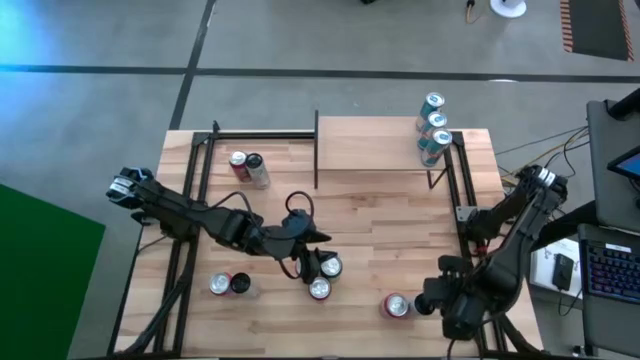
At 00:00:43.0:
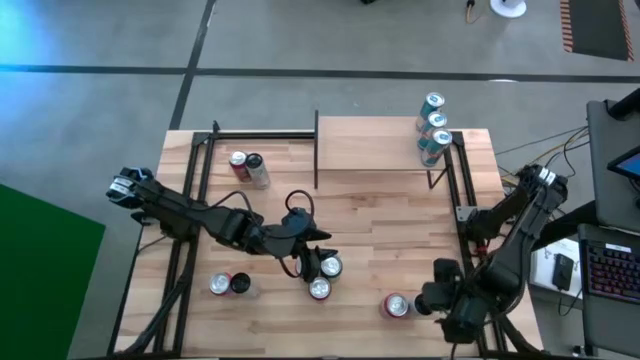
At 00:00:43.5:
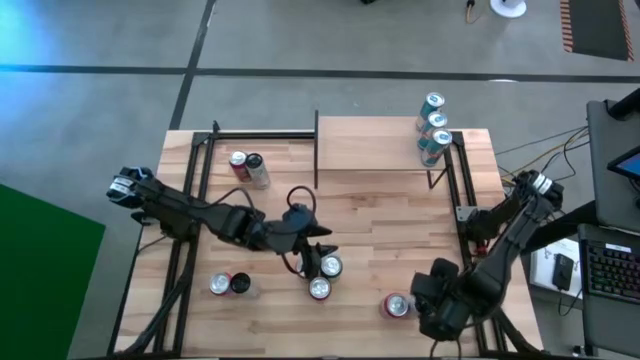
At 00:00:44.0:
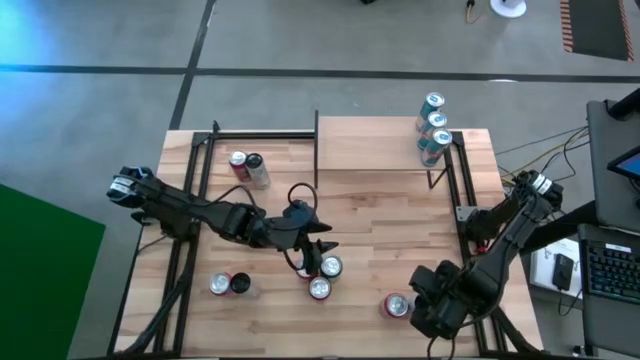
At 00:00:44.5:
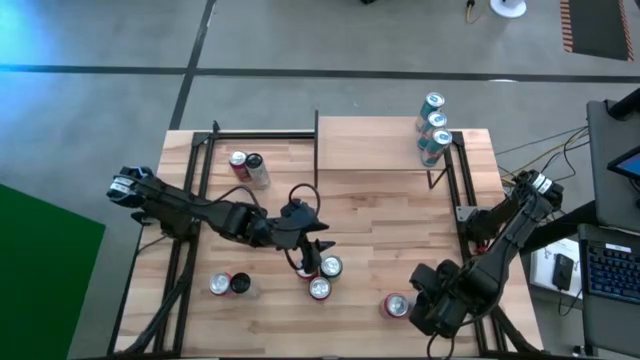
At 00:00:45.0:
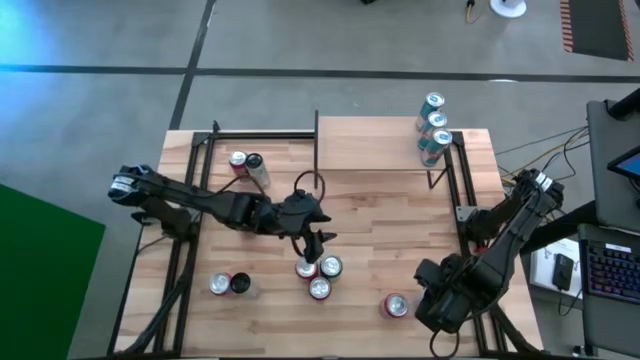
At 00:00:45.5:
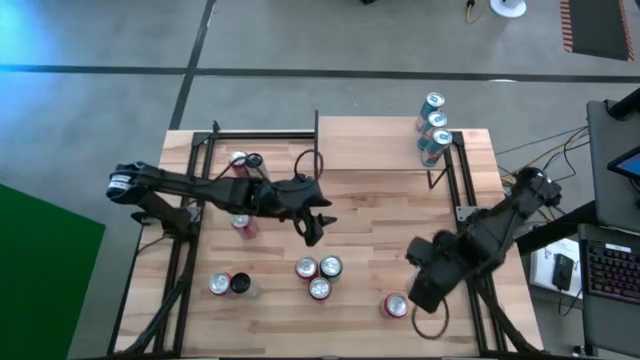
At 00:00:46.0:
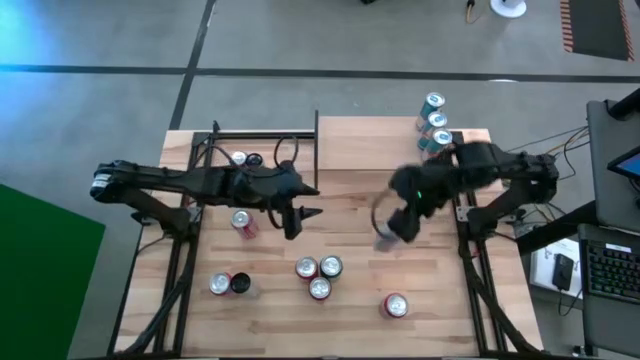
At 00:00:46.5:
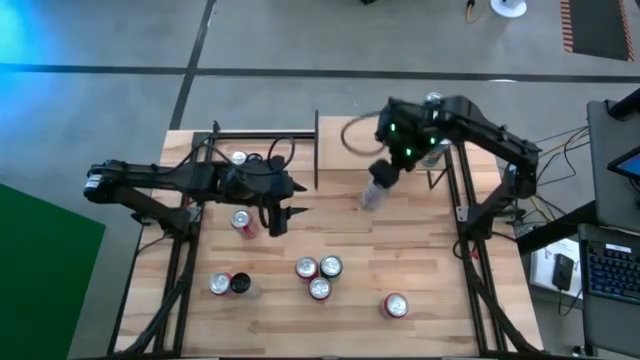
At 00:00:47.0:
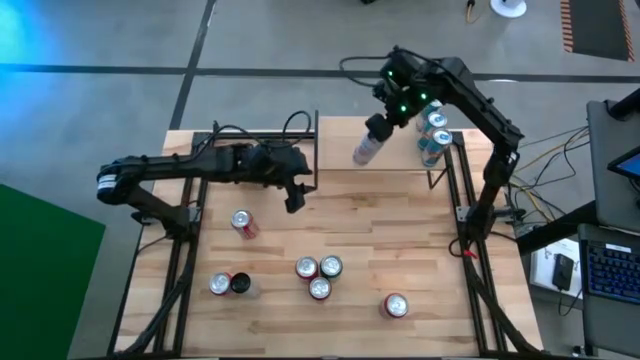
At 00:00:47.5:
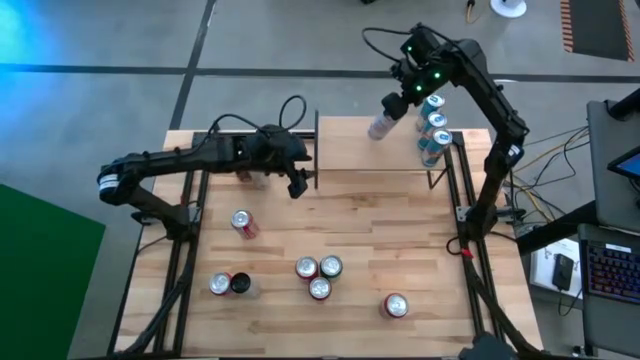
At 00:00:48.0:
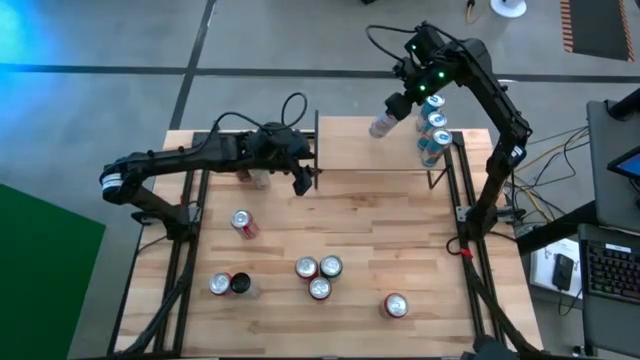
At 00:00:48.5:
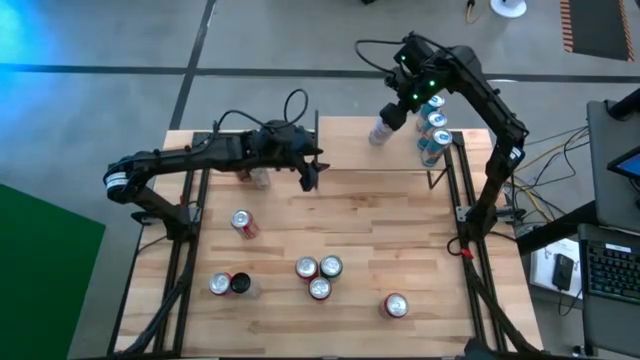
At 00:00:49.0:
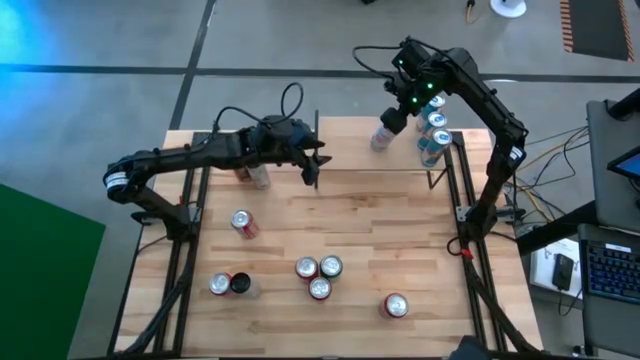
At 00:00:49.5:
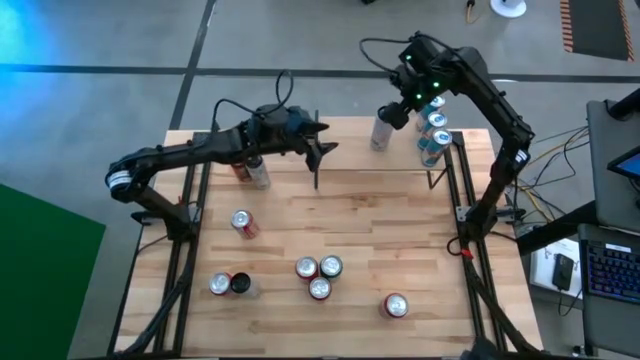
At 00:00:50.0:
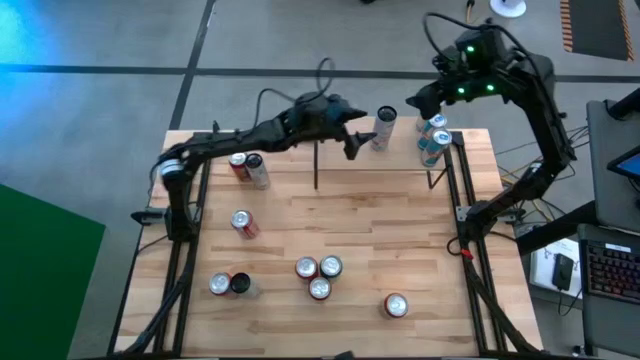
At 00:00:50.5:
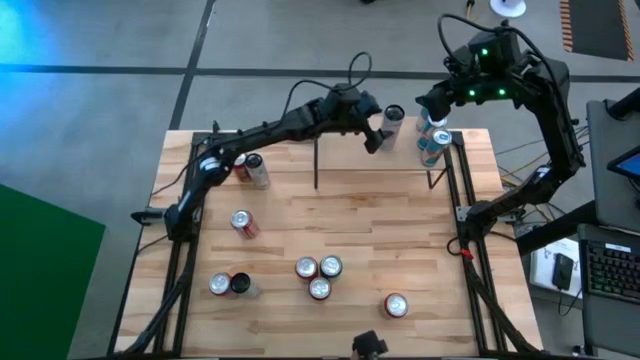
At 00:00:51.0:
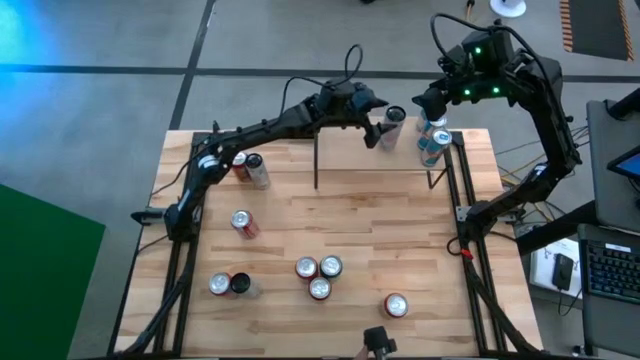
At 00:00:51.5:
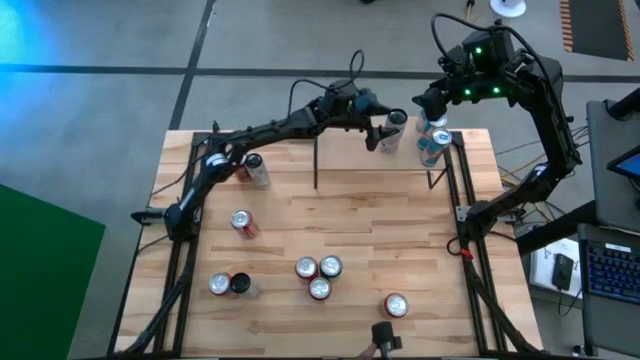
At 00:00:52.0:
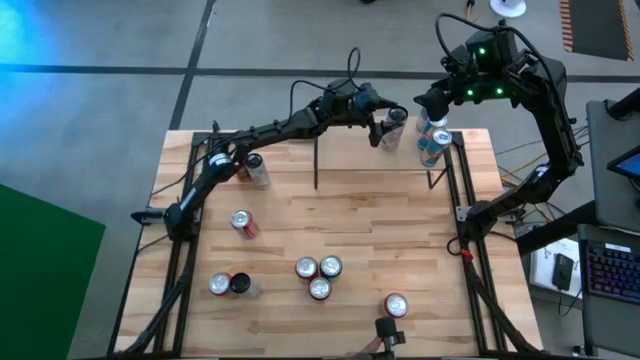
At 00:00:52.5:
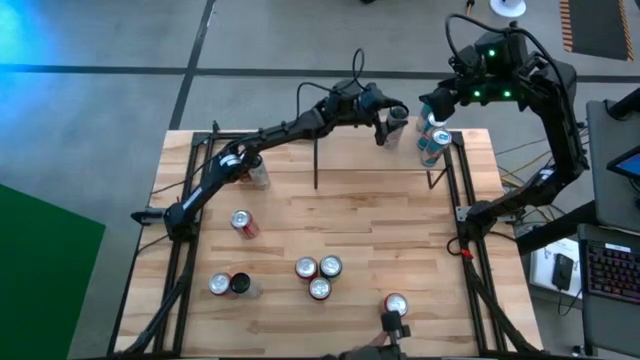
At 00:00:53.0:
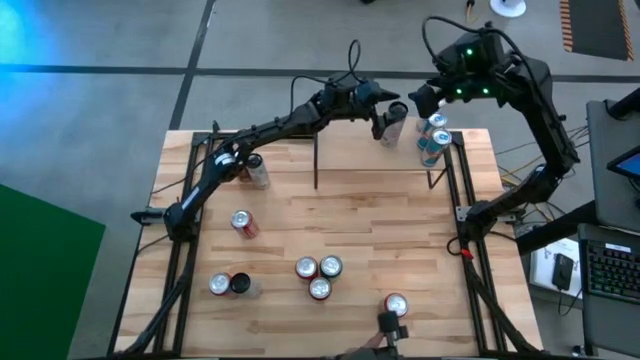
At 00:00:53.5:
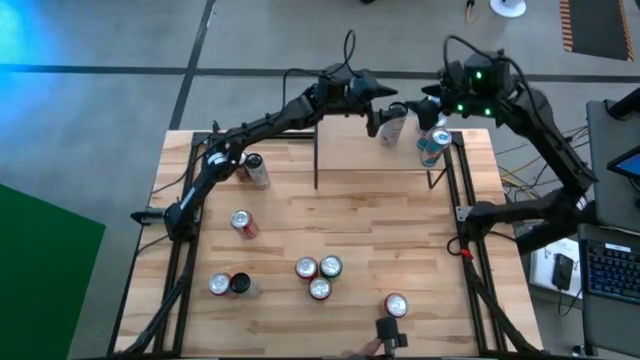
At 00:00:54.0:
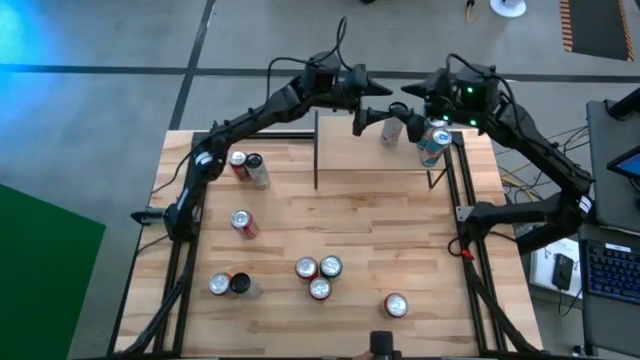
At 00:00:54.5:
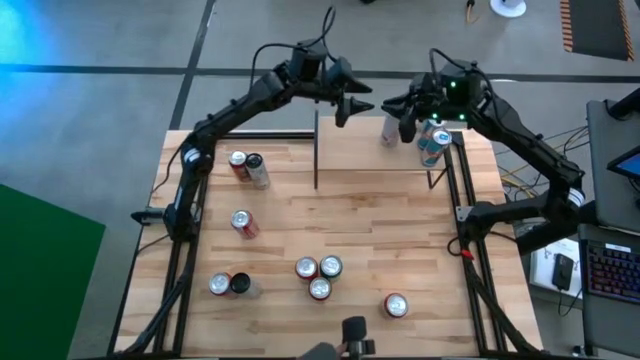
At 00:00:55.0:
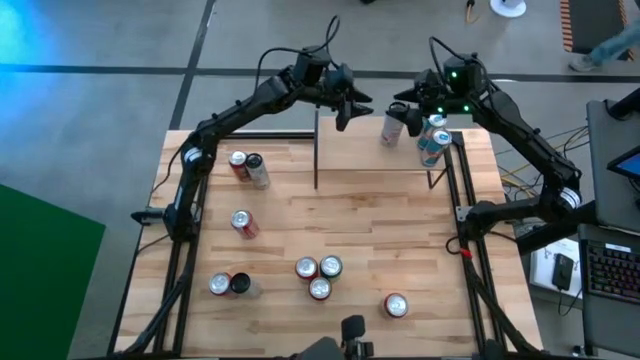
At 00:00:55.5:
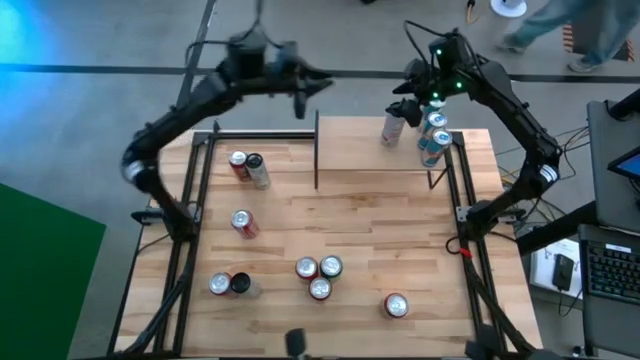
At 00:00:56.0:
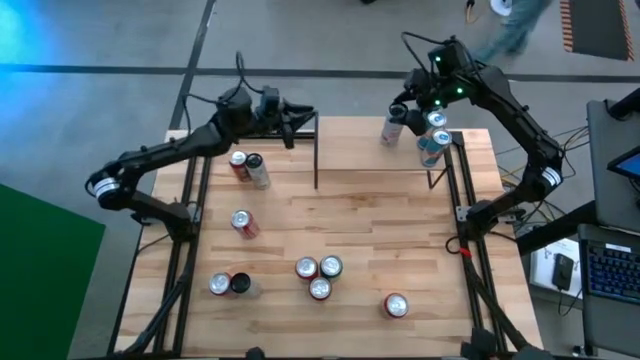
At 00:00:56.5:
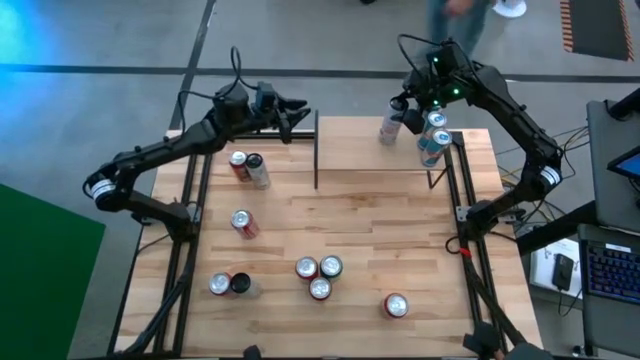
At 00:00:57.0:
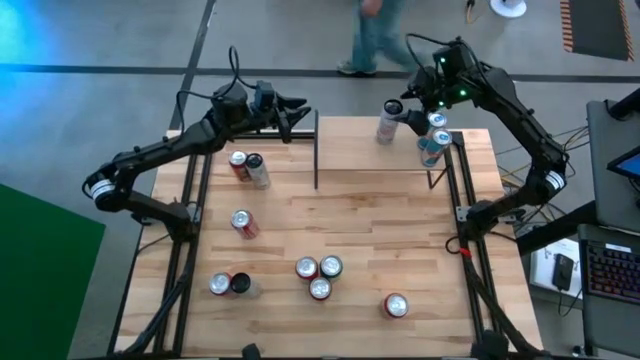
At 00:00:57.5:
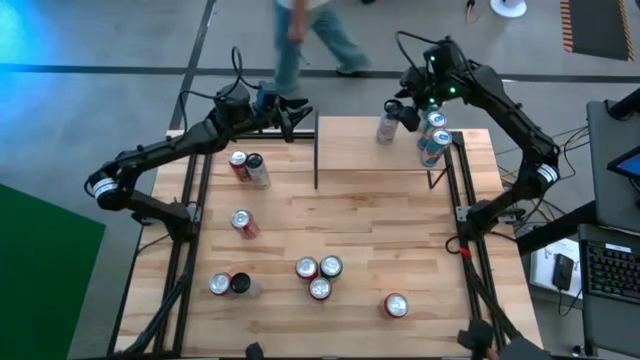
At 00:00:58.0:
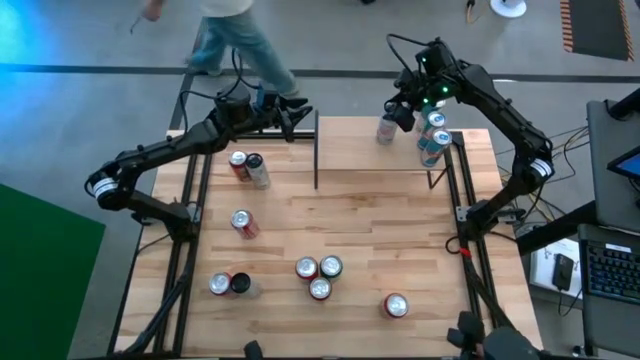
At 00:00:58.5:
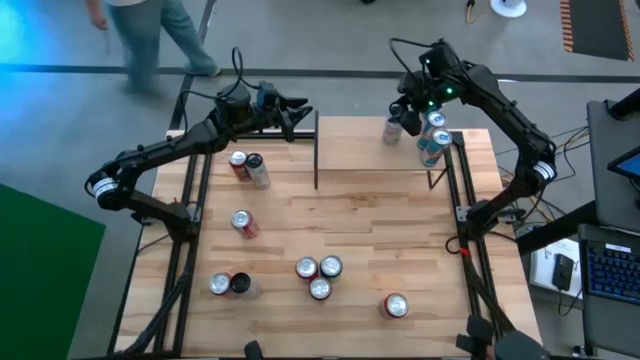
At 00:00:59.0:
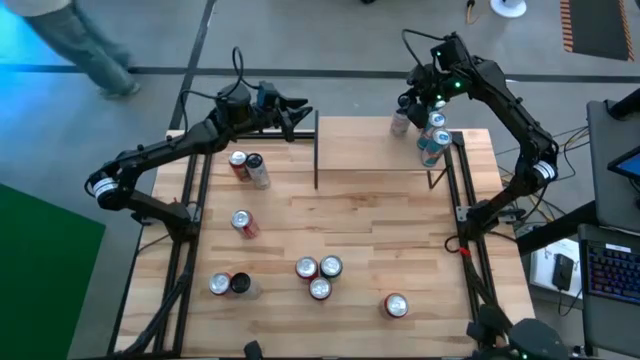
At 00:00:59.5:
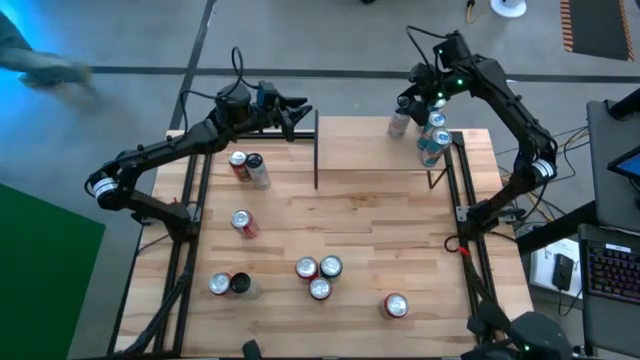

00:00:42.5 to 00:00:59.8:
Task: Place canned beverage on shelf
Put the bottom white-pink soda can on the shelf

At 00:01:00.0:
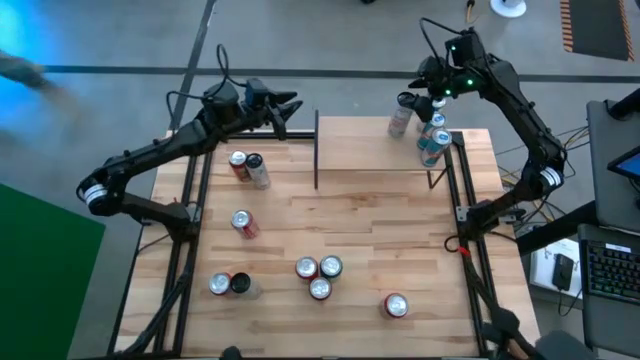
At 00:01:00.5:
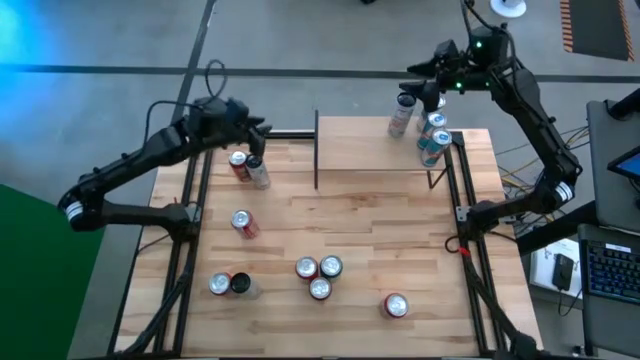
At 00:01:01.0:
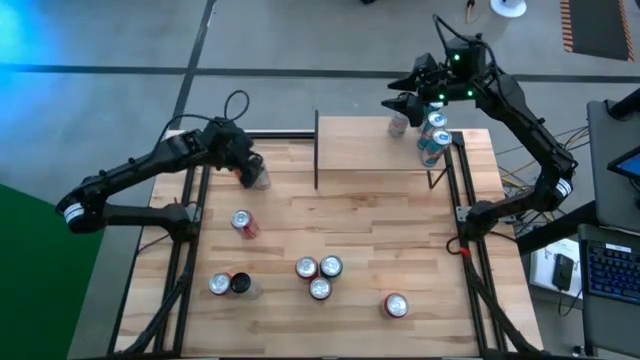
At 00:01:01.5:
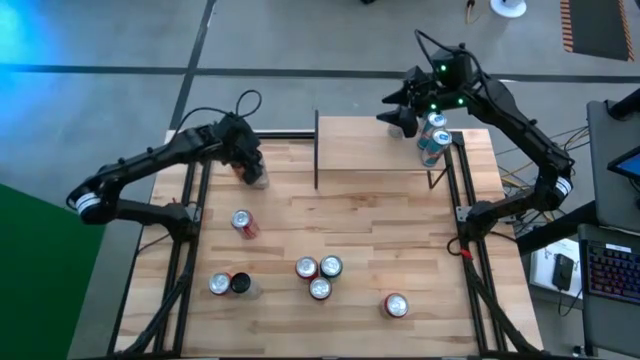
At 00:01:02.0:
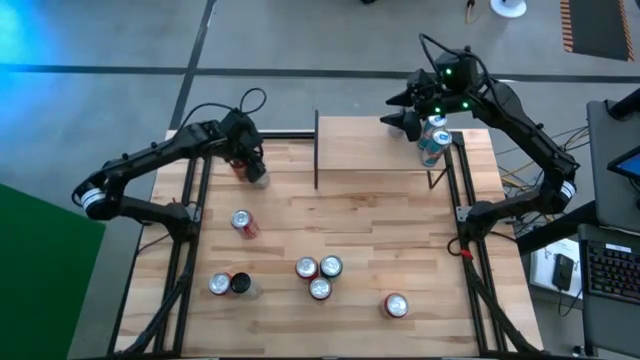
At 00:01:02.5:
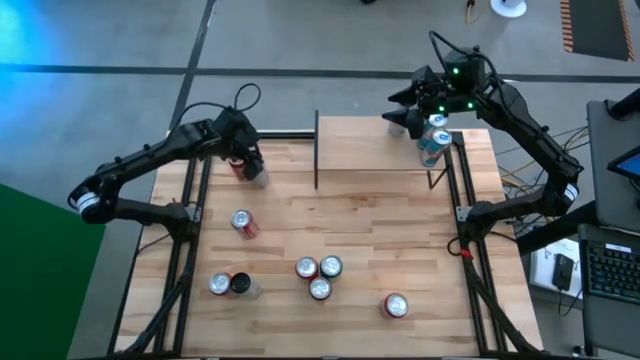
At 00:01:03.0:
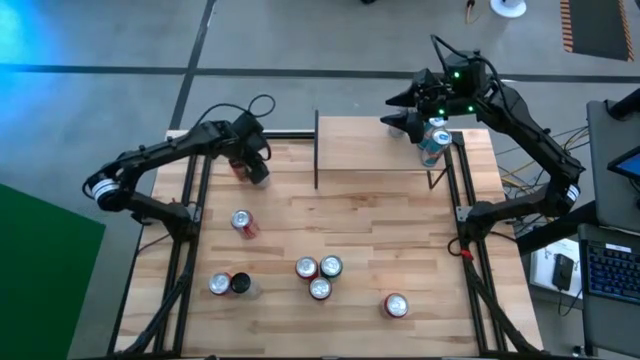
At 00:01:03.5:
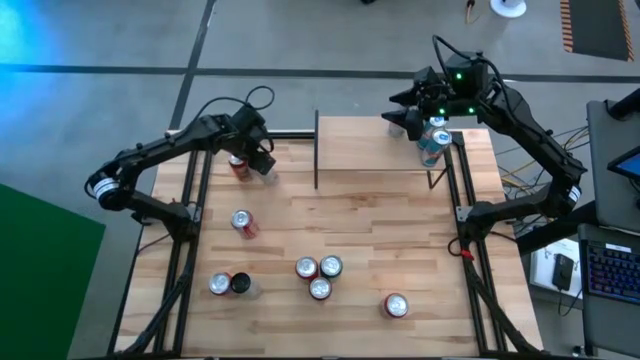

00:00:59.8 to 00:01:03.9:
Put the top white-pink soda can on the shelf aligned with the other white-pink soda can
